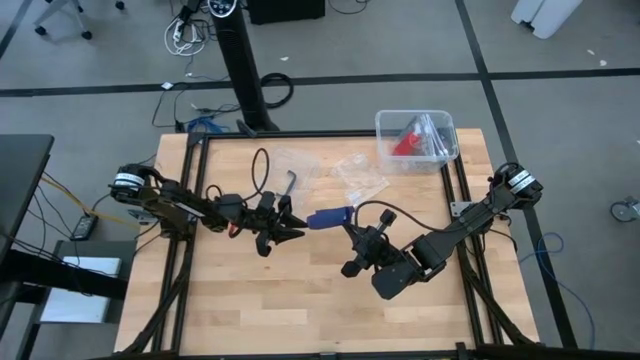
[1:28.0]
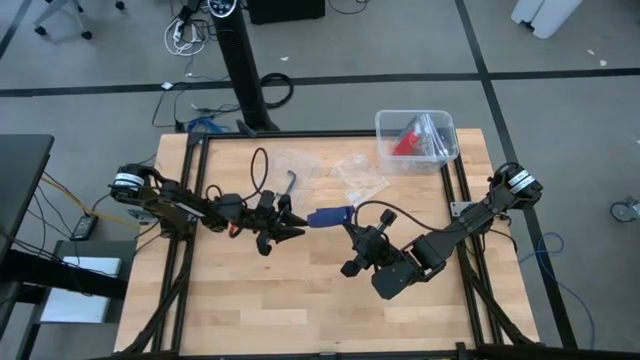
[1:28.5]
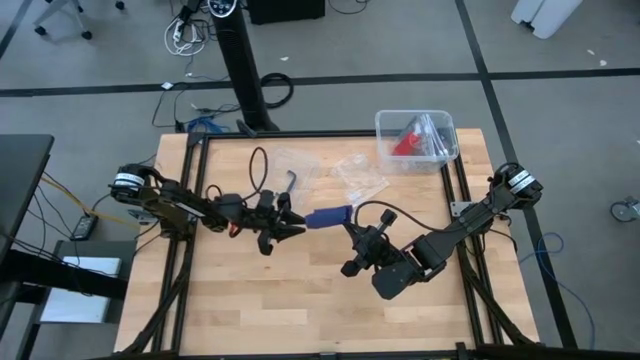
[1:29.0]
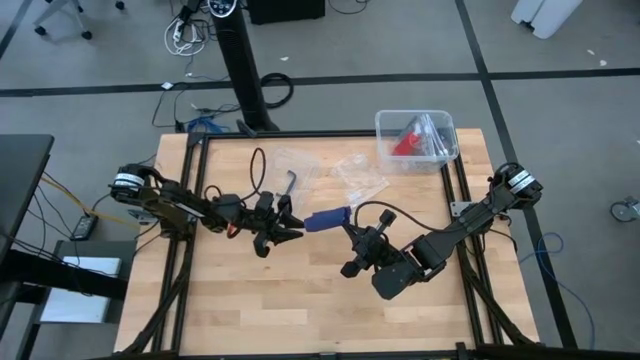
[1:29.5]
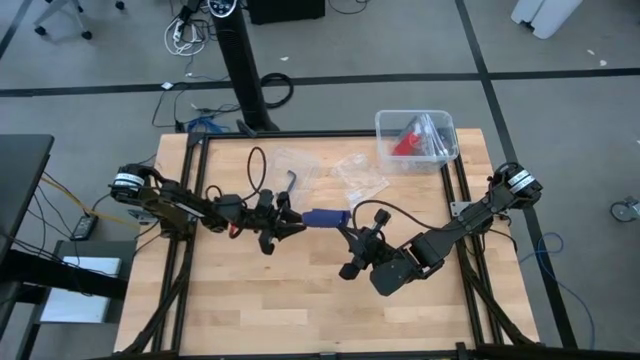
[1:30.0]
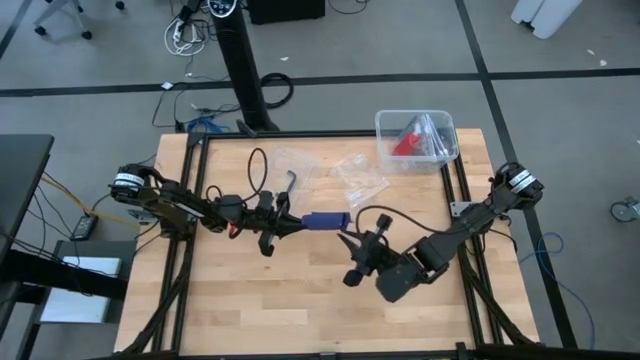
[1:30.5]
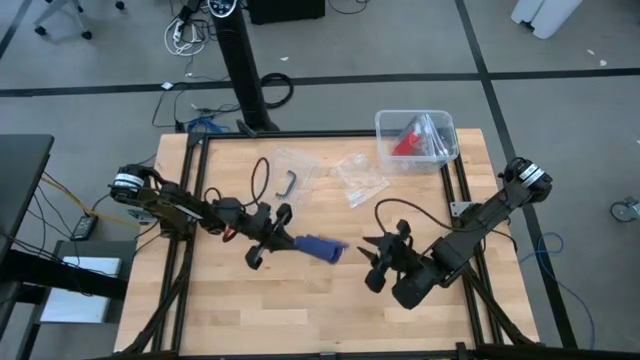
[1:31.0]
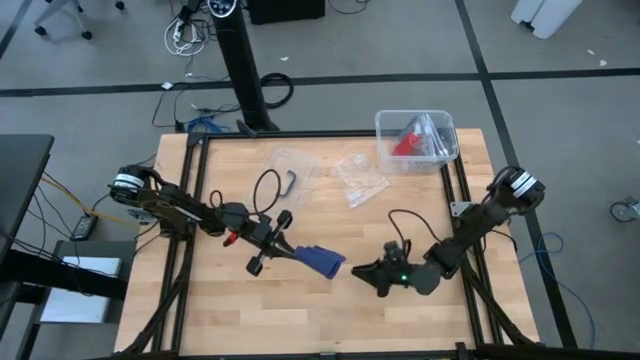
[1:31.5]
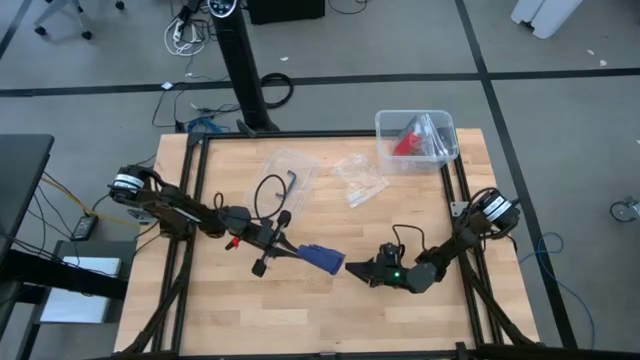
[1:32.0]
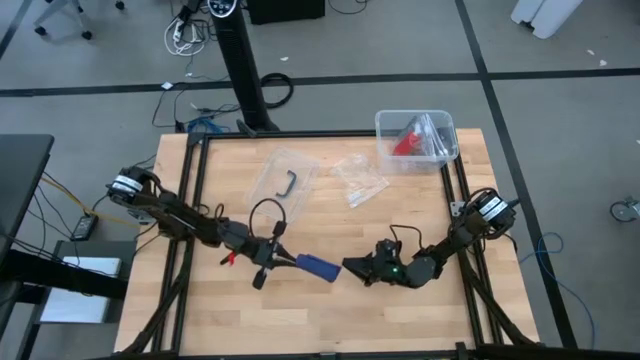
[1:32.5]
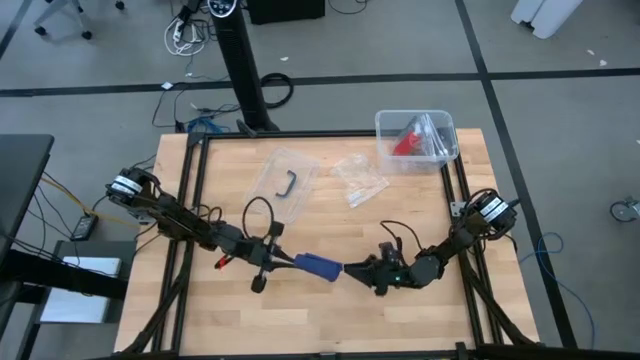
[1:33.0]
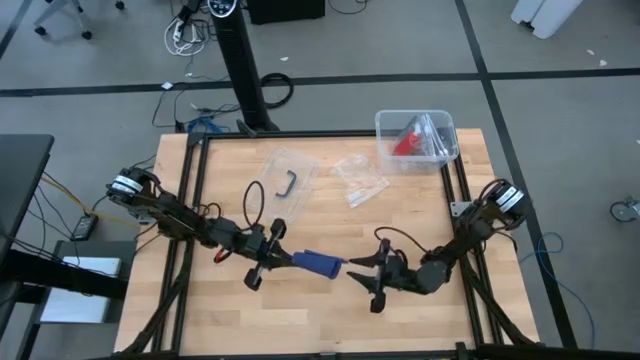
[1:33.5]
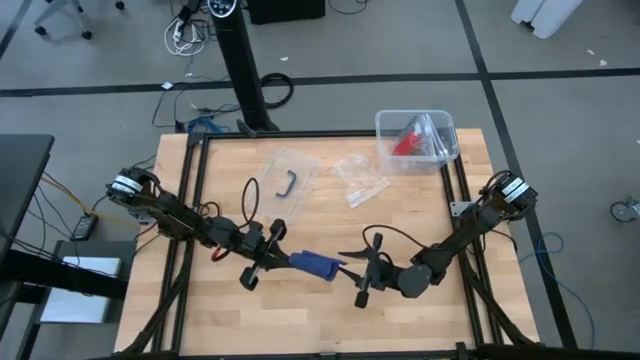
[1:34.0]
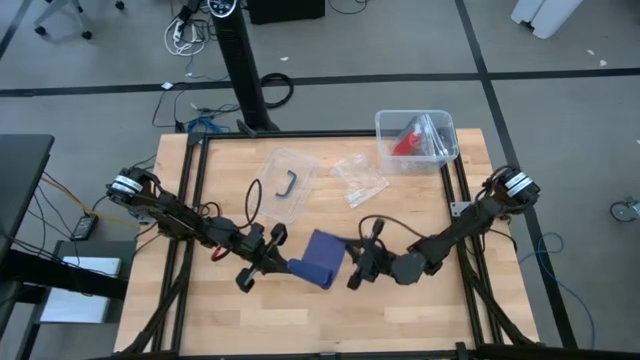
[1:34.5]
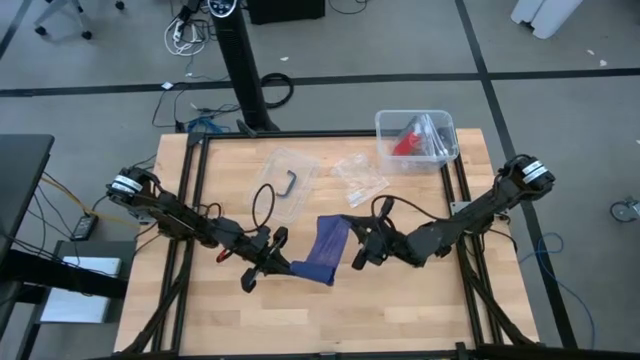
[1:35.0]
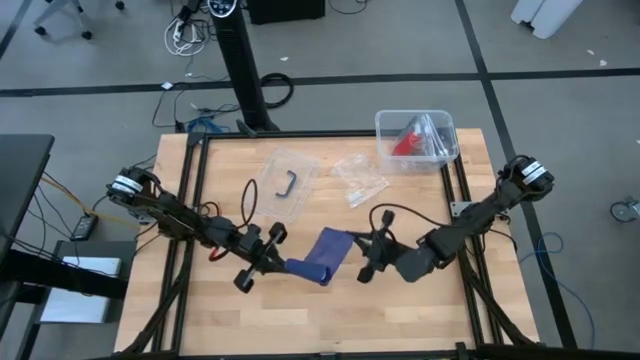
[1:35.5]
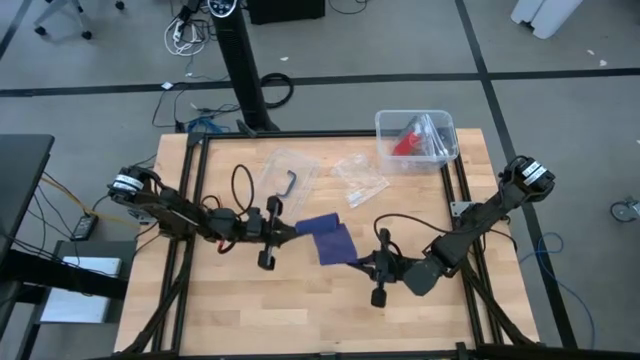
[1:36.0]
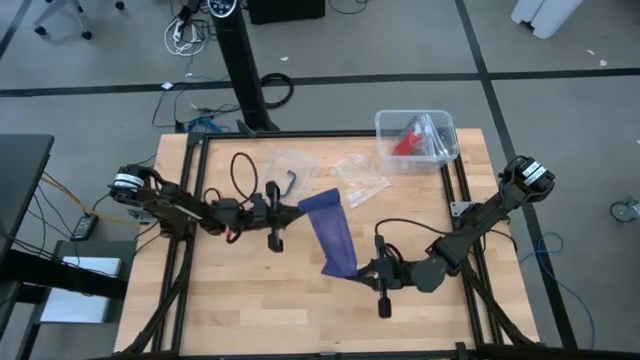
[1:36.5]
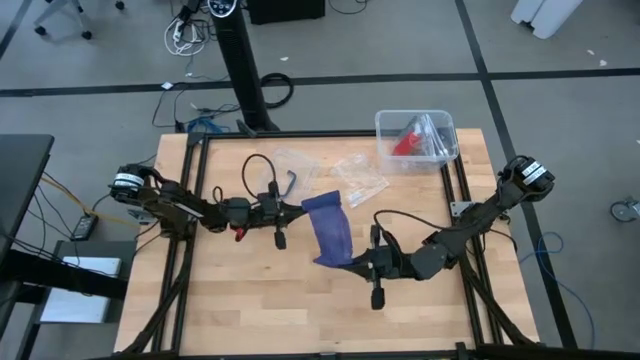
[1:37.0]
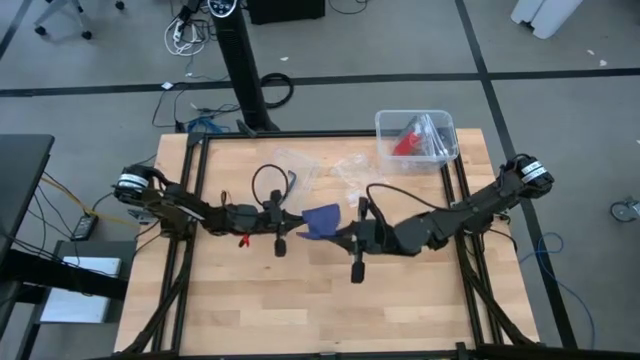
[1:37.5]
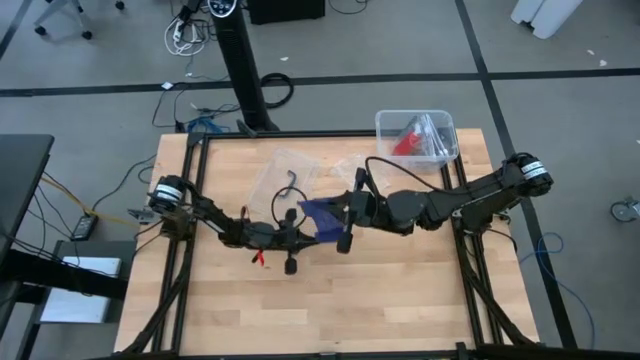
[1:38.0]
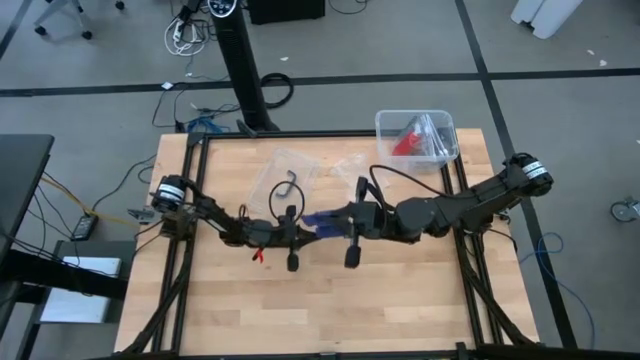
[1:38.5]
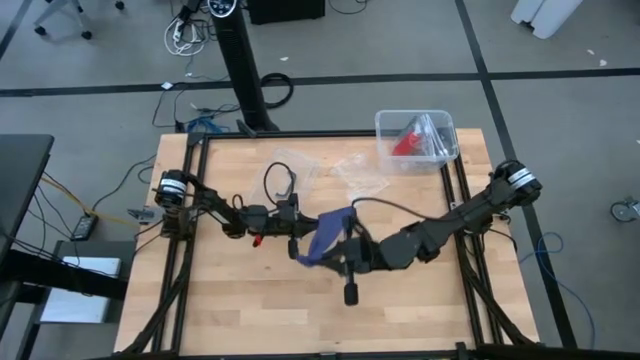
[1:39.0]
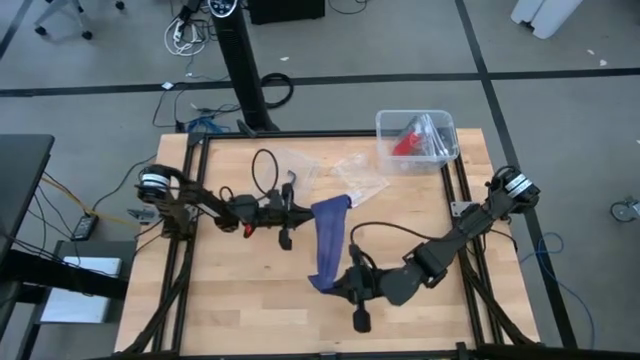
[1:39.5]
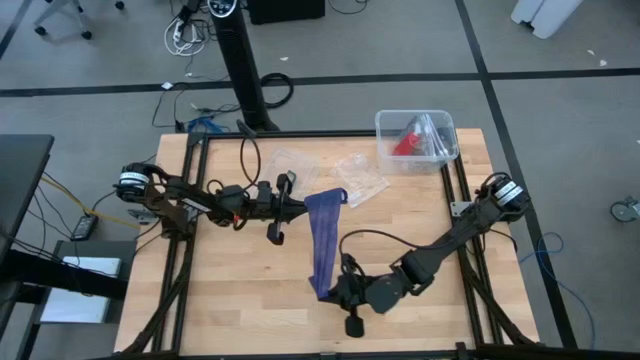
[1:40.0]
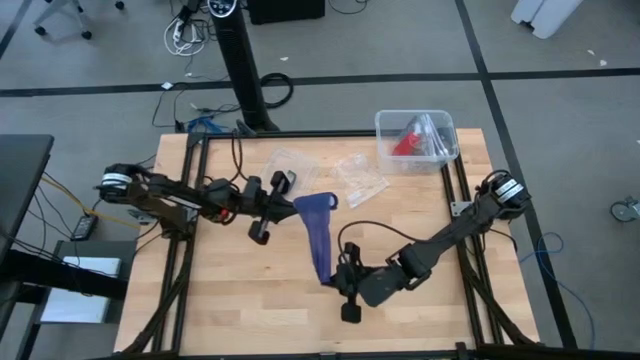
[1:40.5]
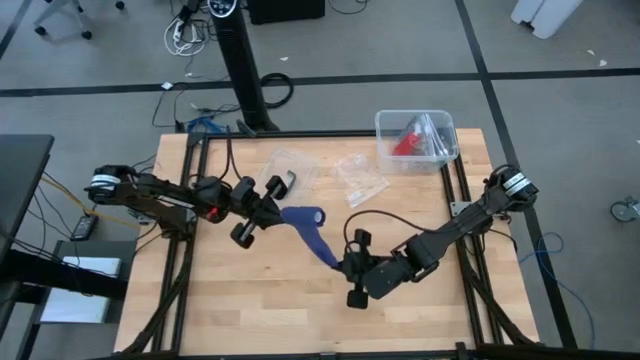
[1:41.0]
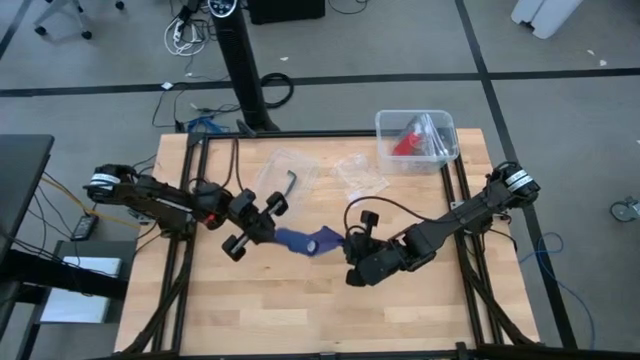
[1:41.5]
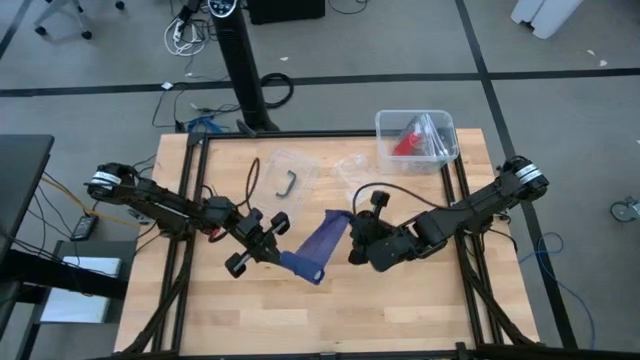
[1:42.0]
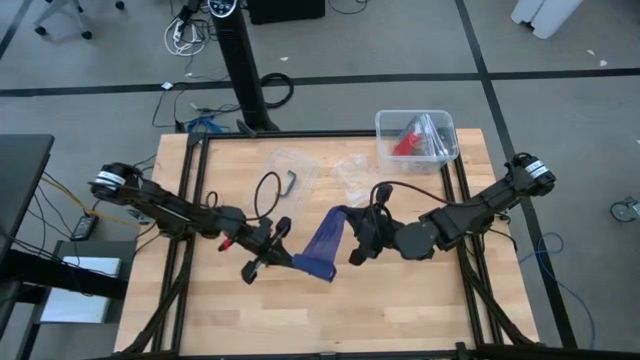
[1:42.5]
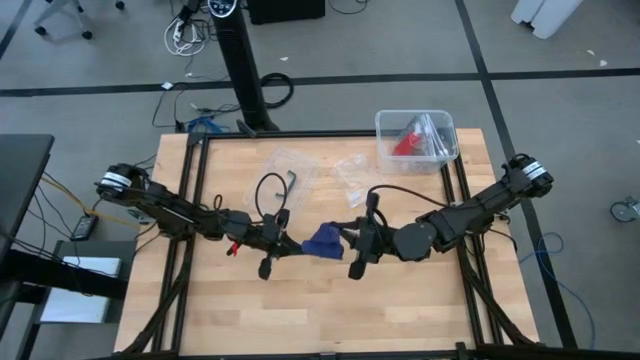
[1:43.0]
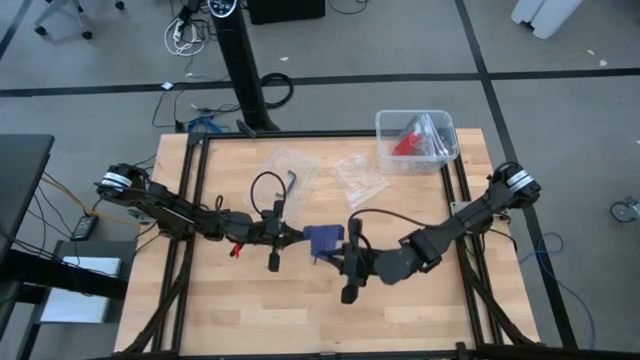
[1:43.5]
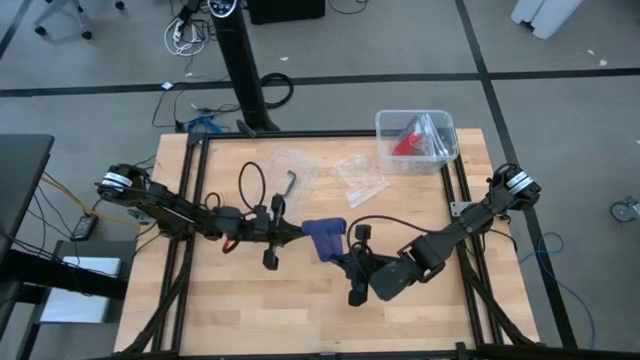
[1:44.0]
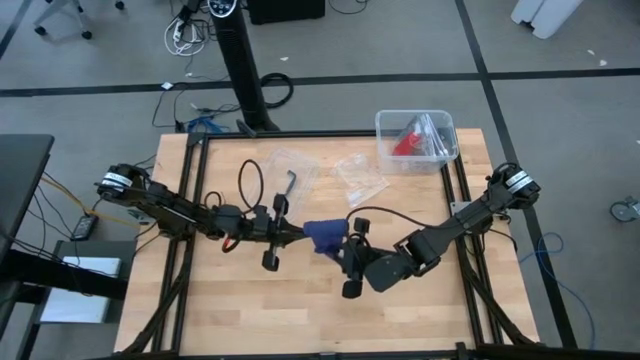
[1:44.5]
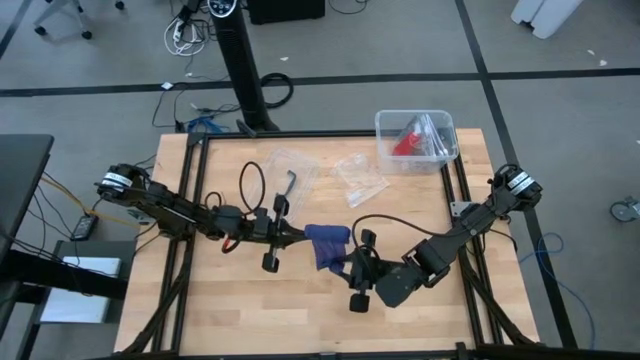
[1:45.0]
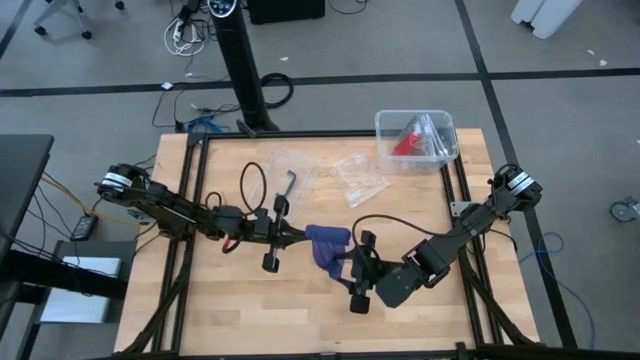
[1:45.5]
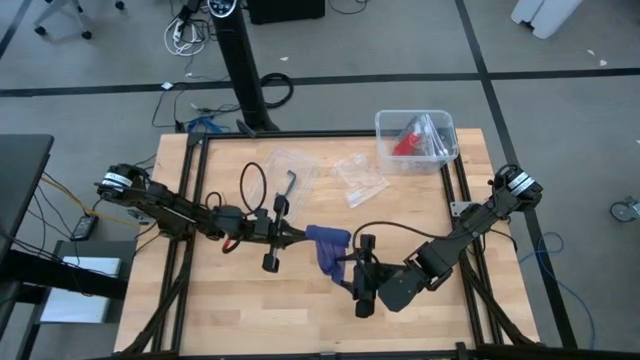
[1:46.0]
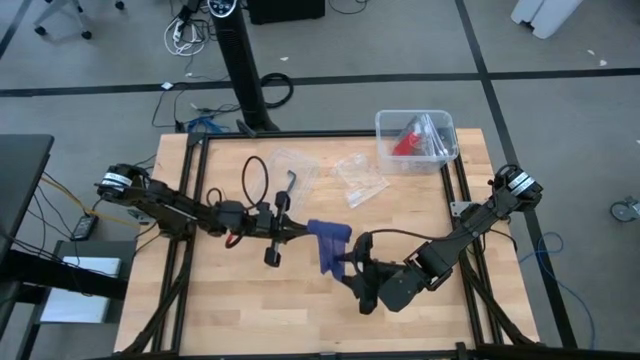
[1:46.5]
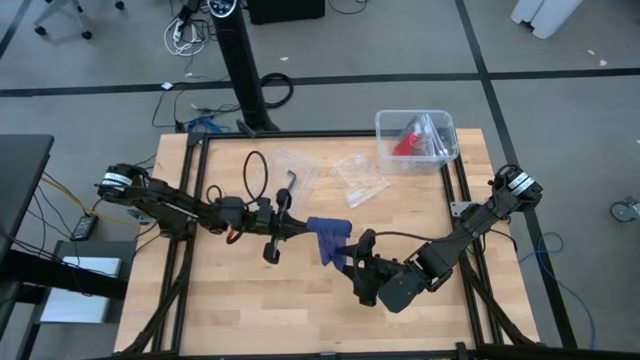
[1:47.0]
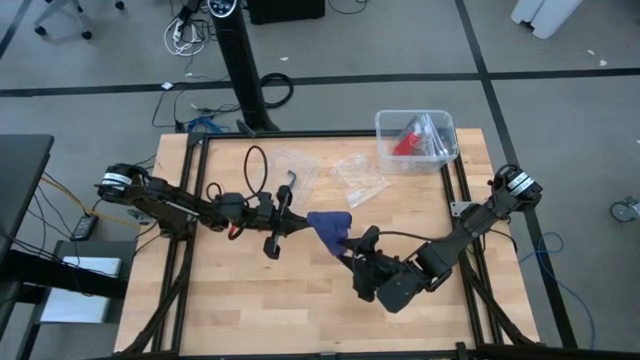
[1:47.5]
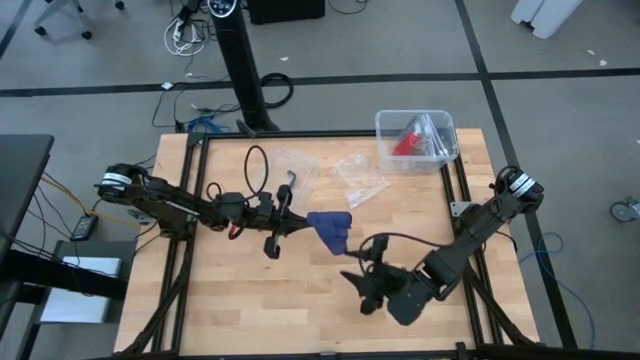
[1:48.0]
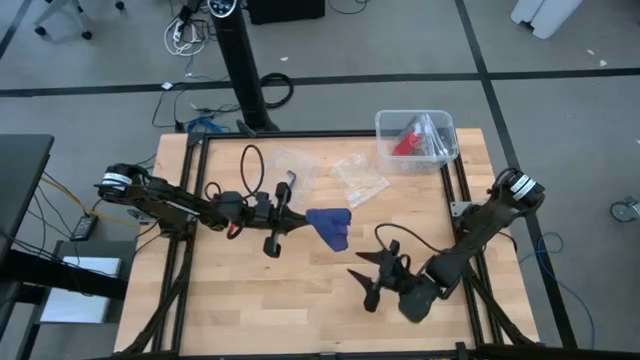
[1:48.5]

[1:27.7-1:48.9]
Task: Roll bandage
Roll the blue bandage
